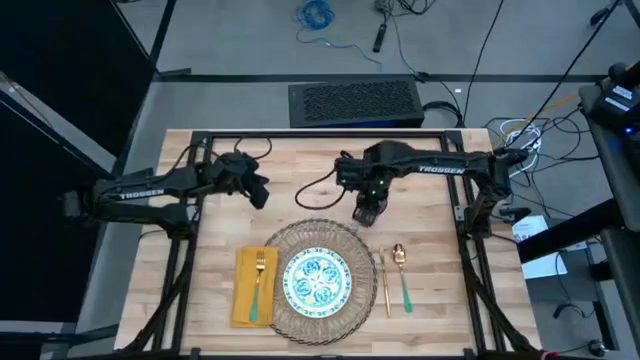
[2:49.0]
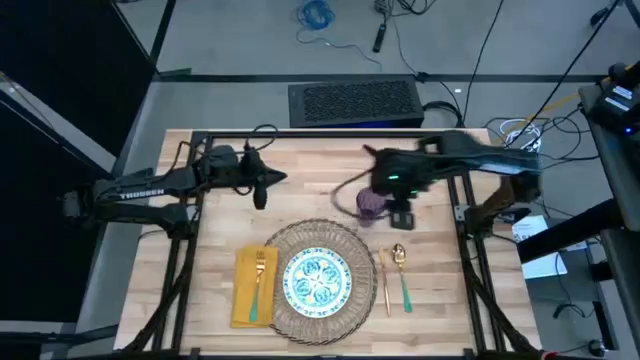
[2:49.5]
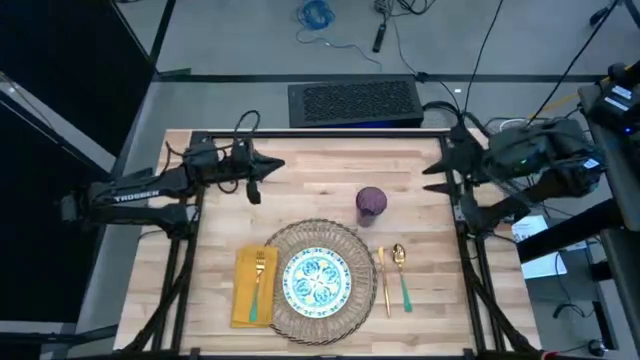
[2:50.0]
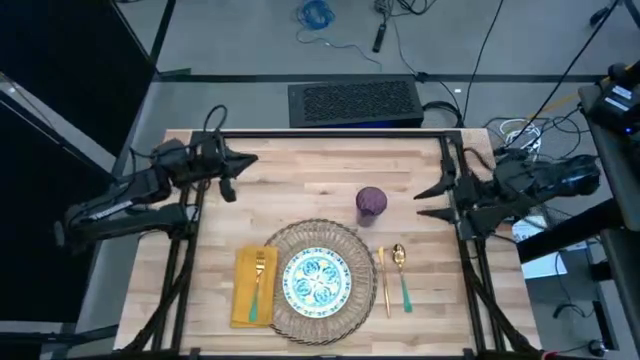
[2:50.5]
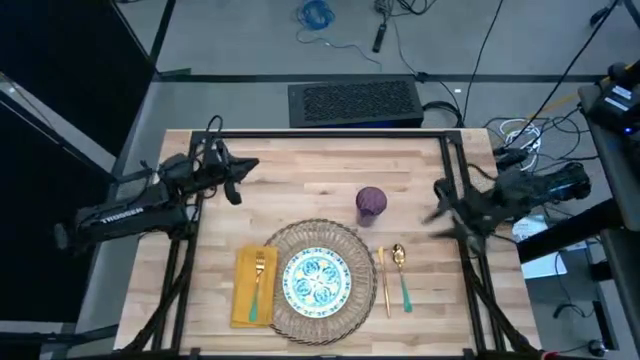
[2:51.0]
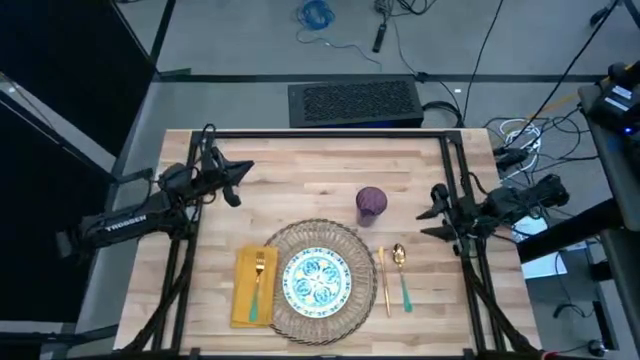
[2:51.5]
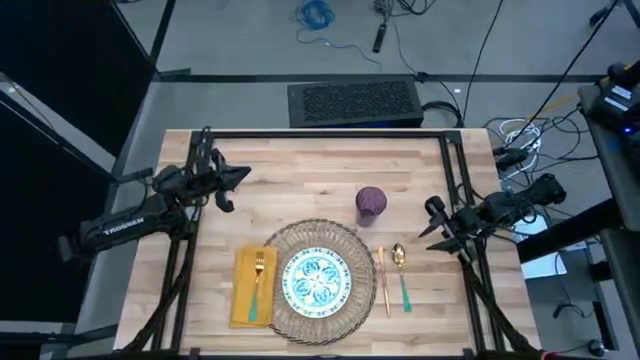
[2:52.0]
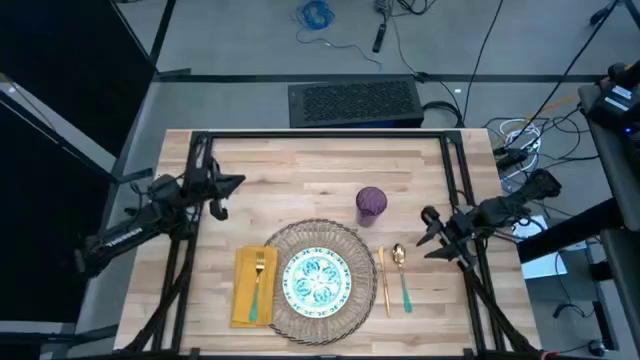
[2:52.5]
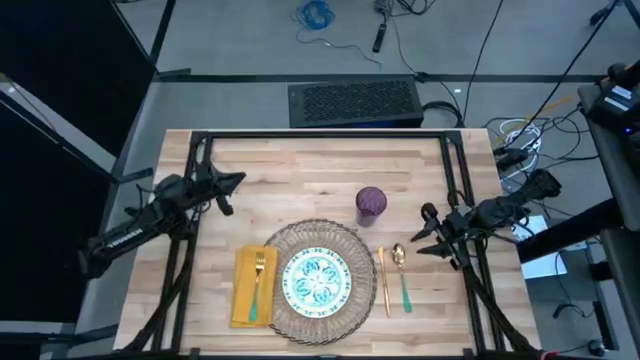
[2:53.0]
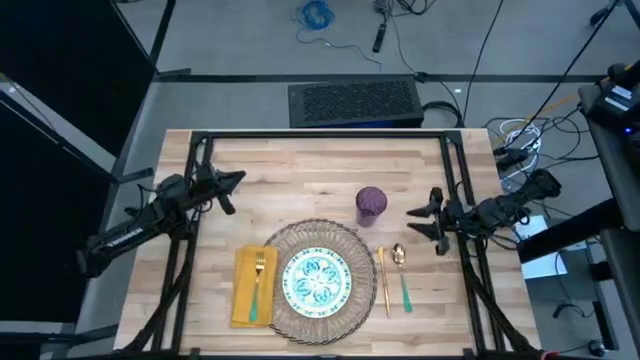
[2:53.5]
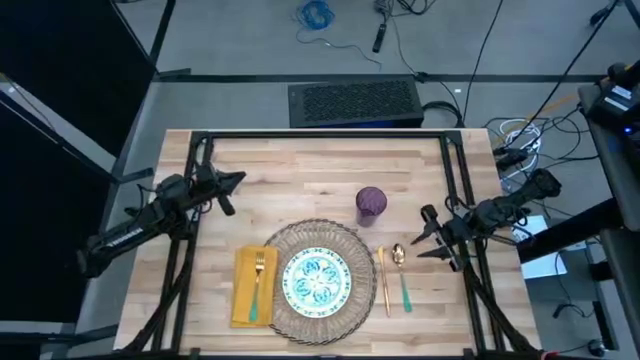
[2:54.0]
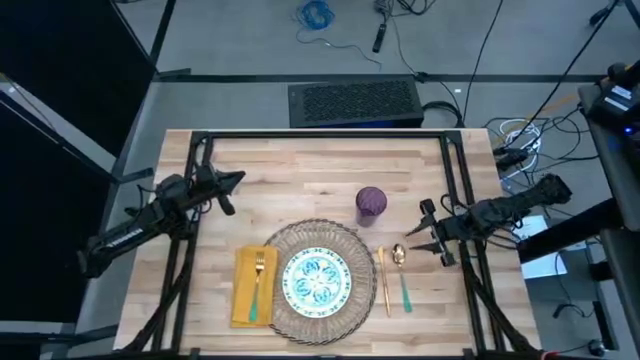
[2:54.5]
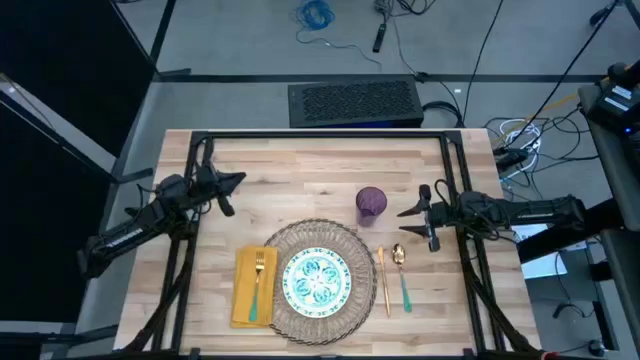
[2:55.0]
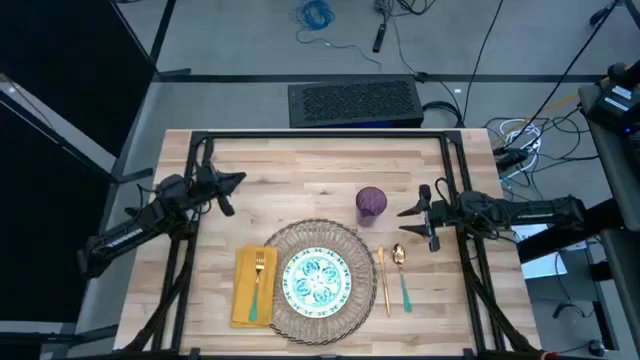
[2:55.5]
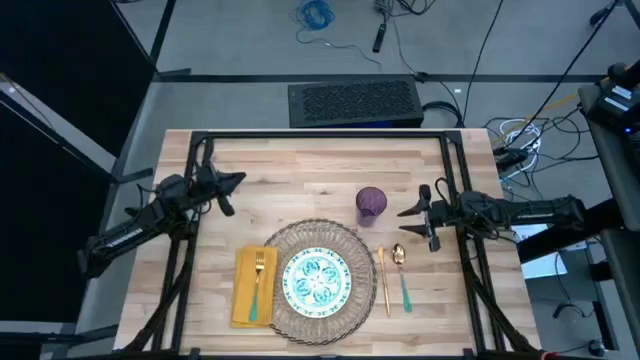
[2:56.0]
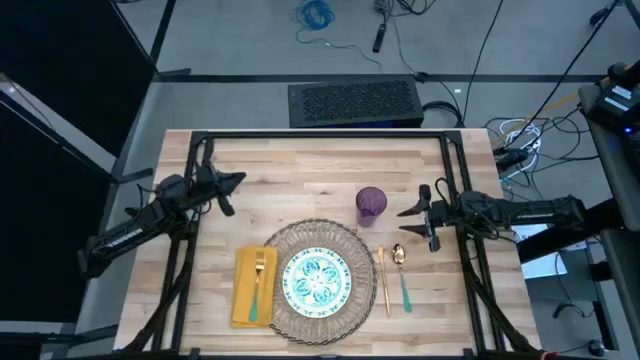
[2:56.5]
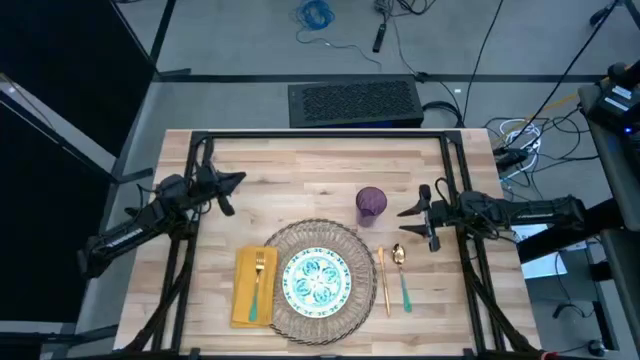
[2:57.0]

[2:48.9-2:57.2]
Task: Set table place
Return to Home Position

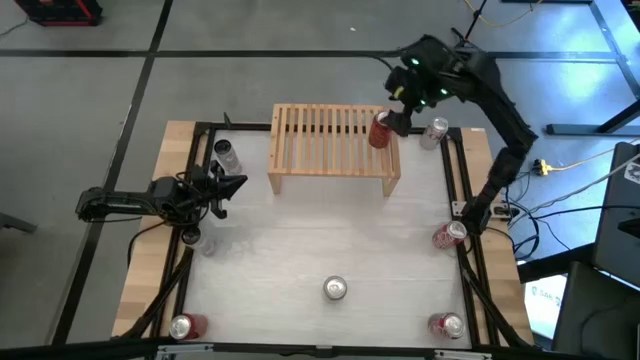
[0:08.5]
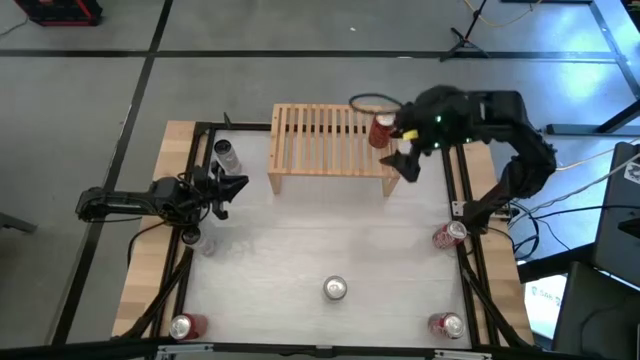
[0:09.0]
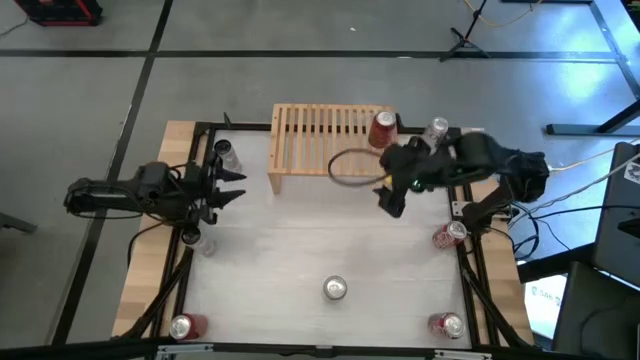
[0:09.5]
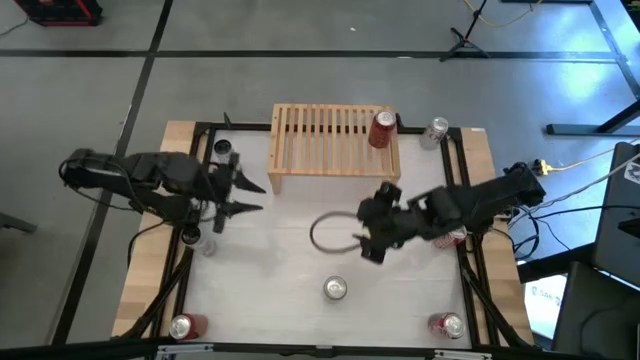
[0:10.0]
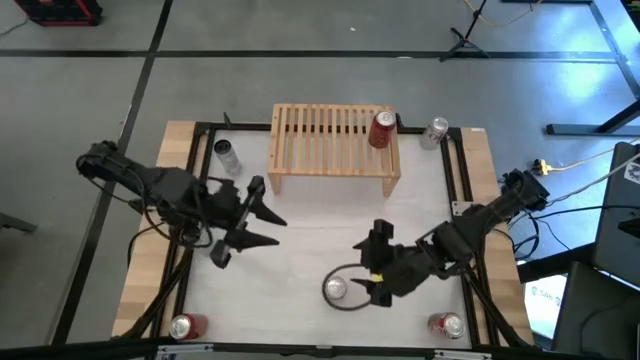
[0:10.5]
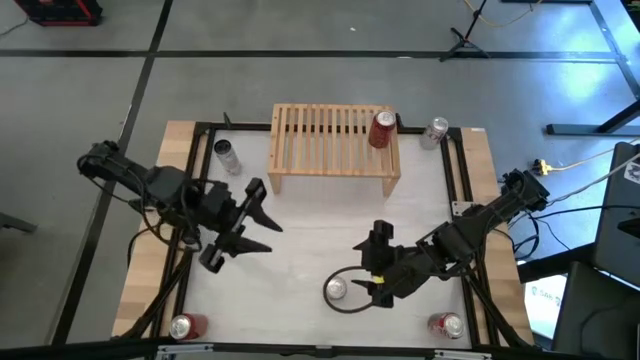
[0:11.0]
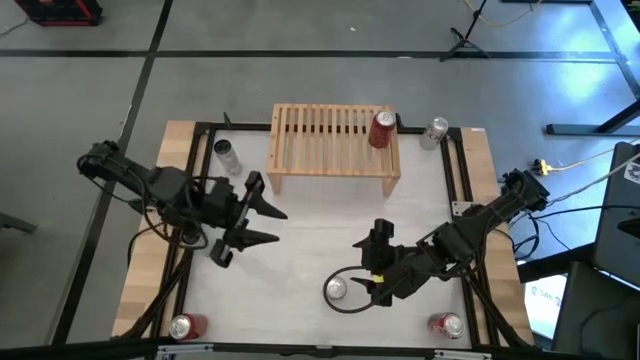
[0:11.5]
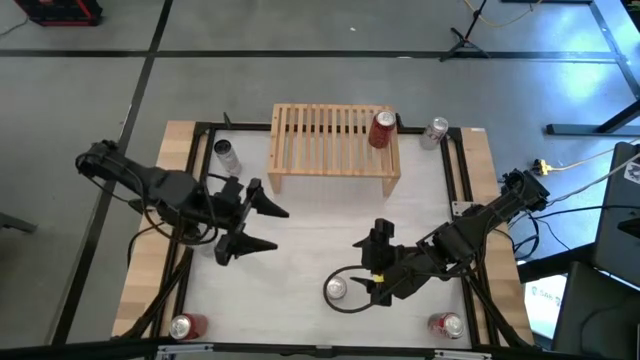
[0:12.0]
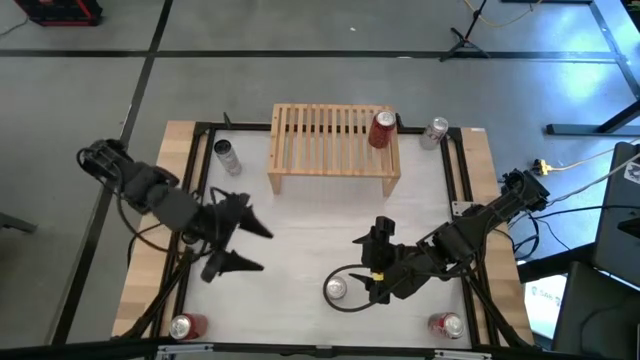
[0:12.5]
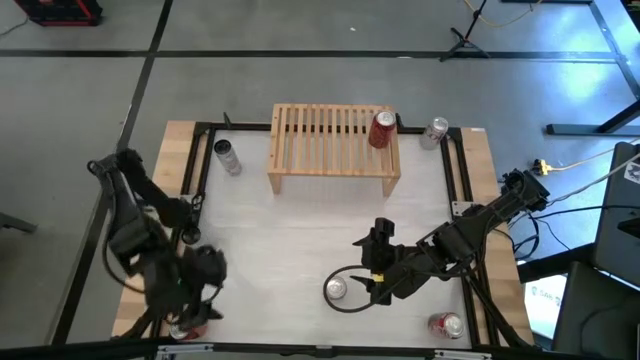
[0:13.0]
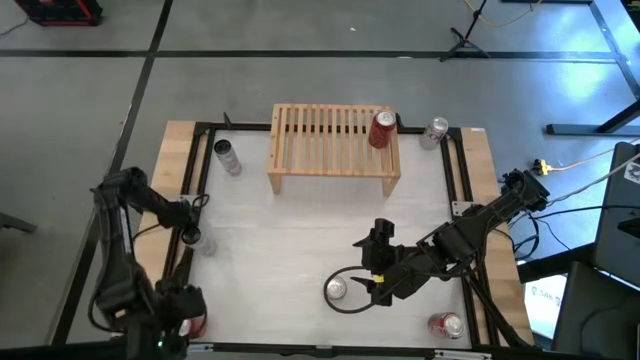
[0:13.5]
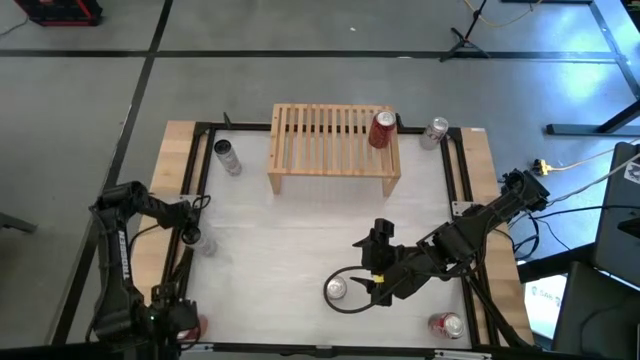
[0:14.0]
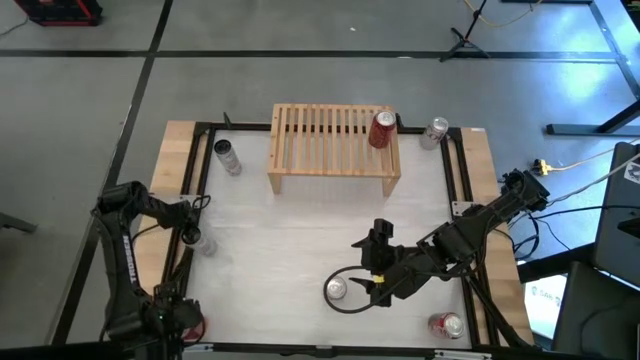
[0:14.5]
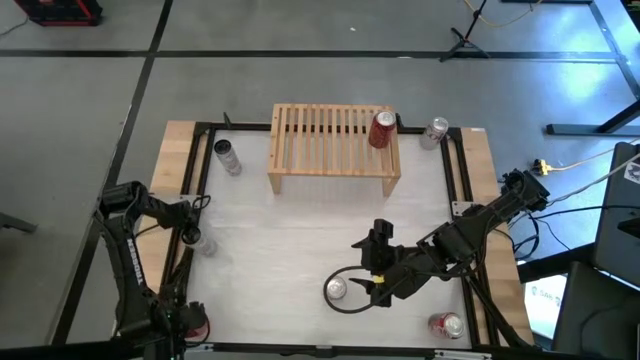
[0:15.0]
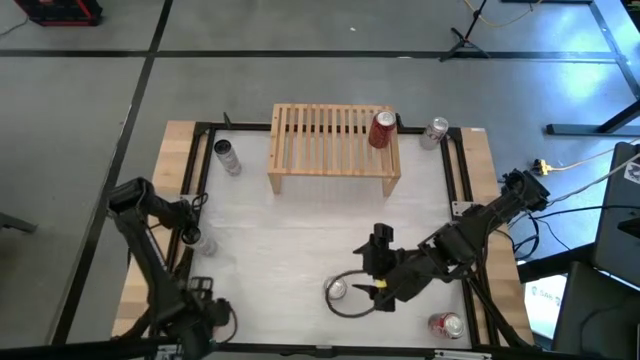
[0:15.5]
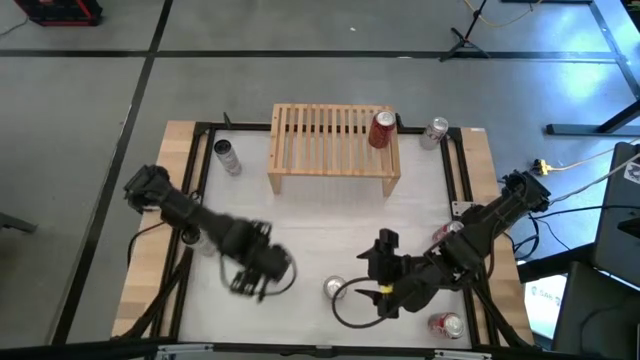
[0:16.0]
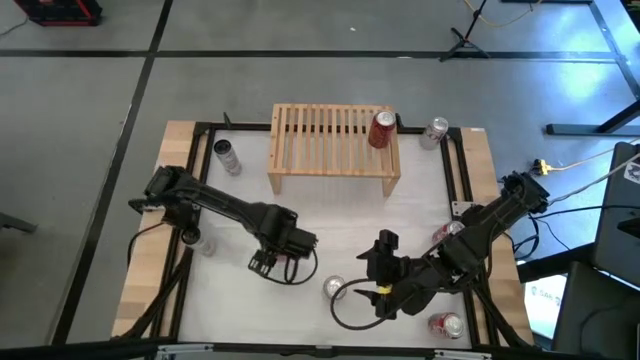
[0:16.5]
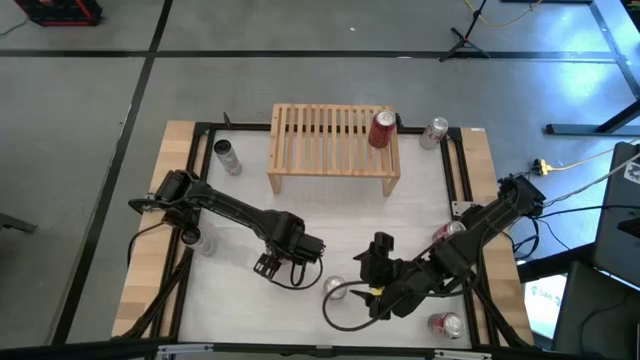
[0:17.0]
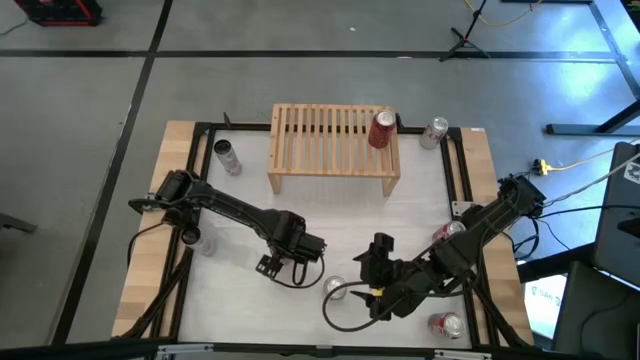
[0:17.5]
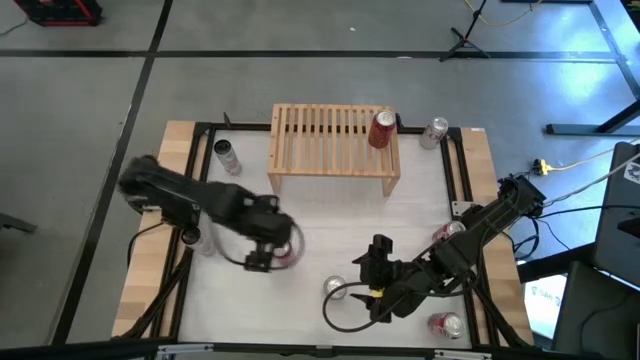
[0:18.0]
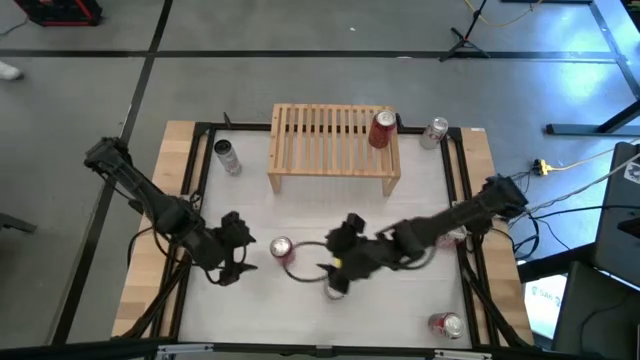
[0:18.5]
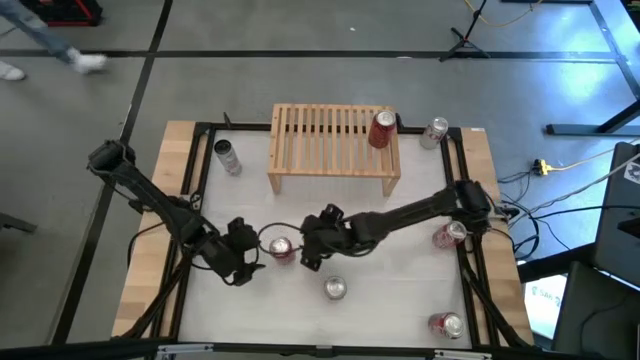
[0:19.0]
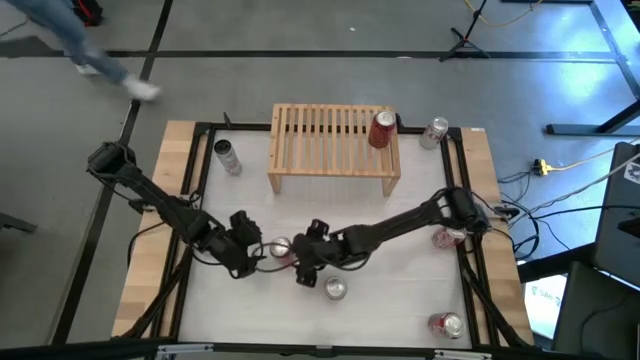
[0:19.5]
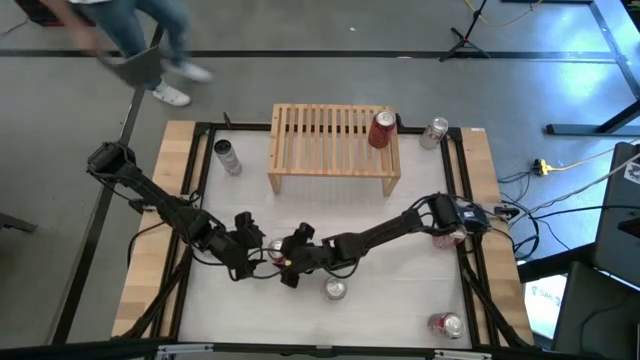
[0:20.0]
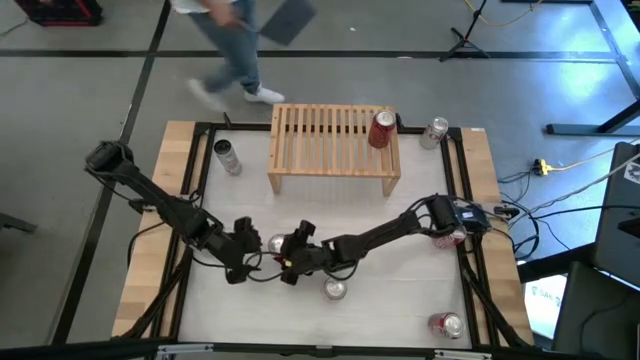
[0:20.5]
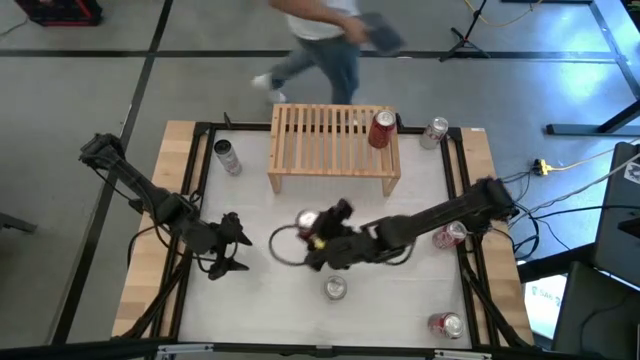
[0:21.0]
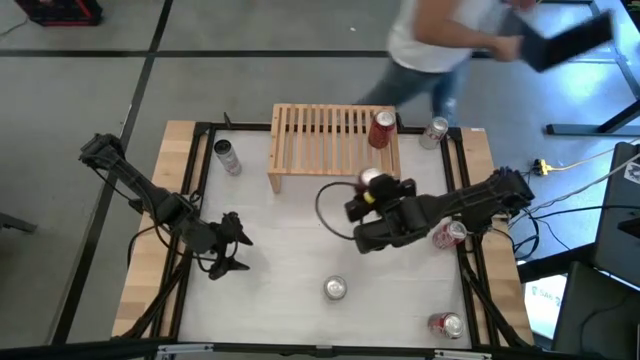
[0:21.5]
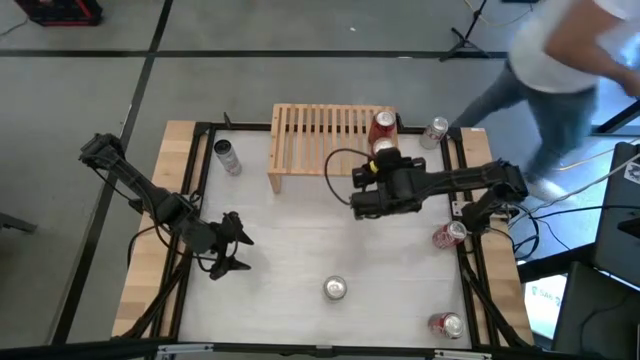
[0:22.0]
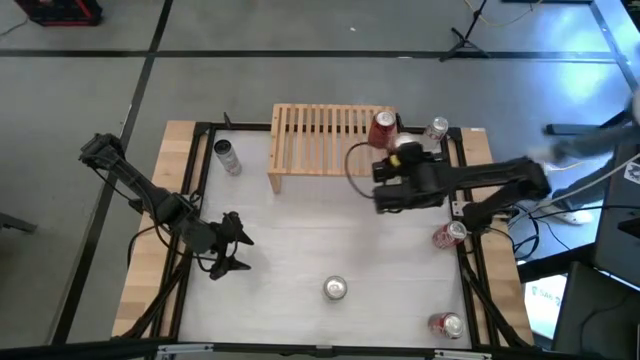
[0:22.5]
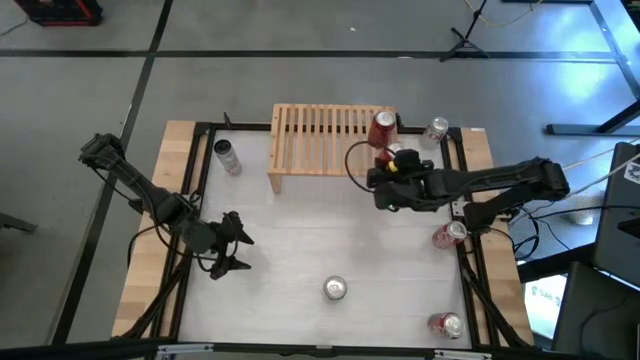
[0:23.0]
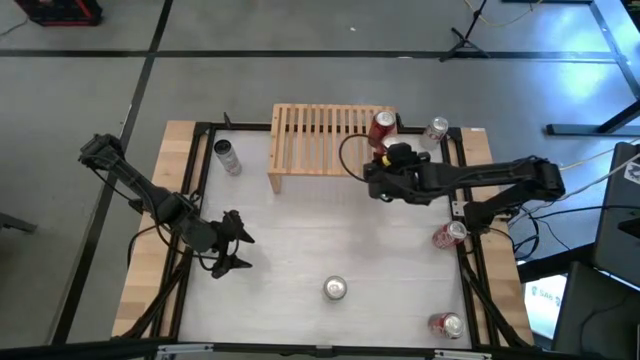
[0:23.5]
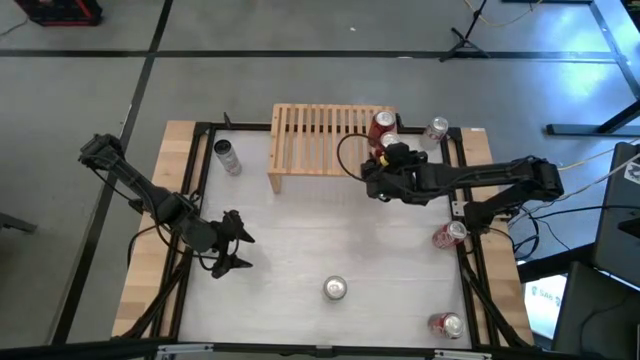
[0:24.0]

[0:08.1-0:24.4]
Task: Place canned beverage on shelf
Put the red and black soda can on the shelf aligned with the other red and black soda can
